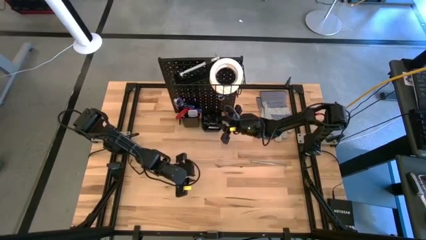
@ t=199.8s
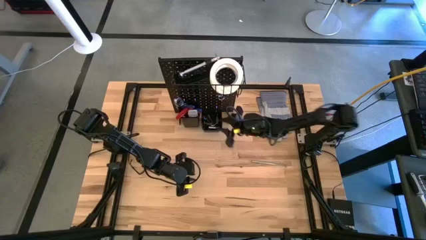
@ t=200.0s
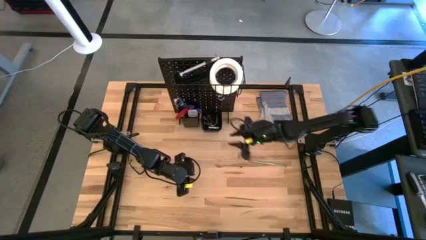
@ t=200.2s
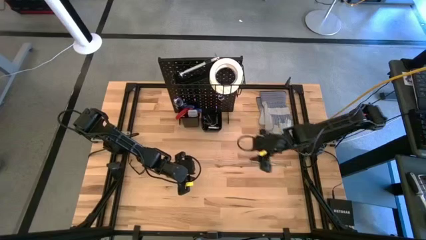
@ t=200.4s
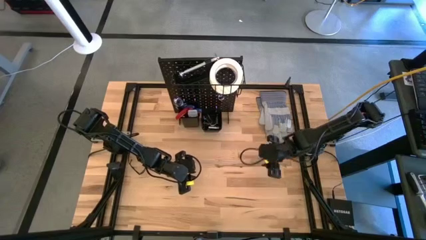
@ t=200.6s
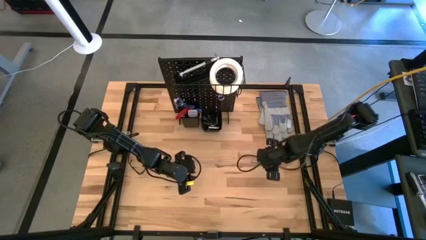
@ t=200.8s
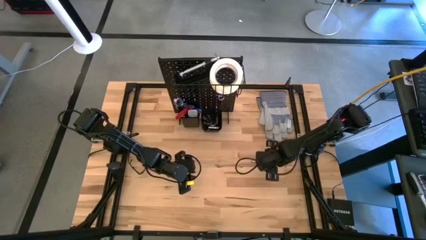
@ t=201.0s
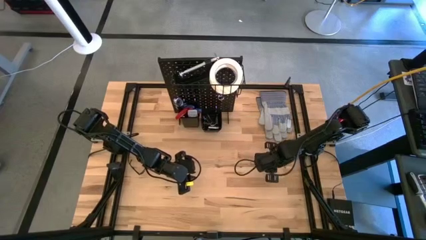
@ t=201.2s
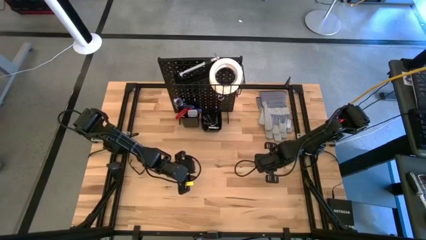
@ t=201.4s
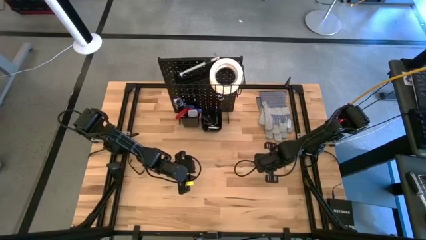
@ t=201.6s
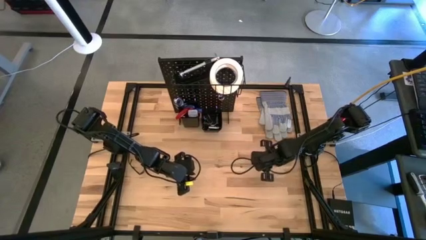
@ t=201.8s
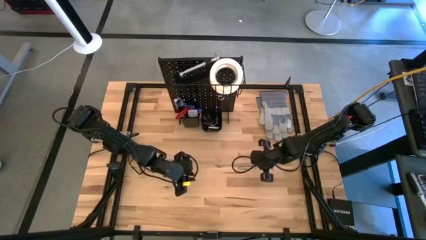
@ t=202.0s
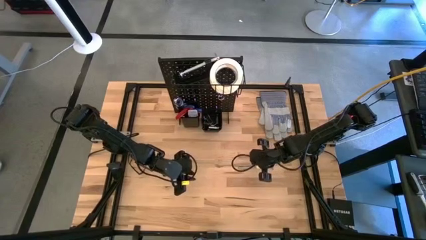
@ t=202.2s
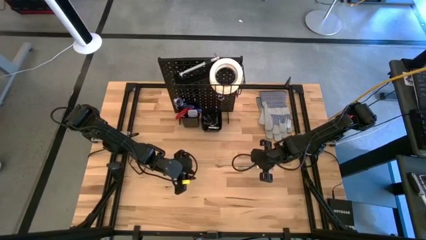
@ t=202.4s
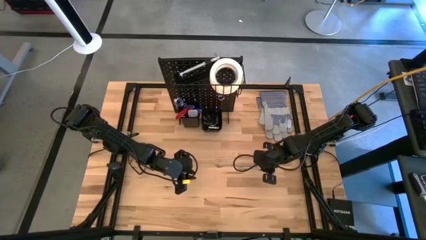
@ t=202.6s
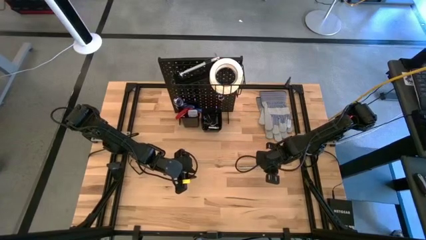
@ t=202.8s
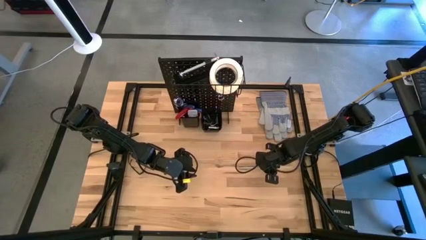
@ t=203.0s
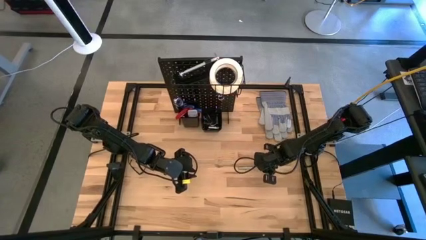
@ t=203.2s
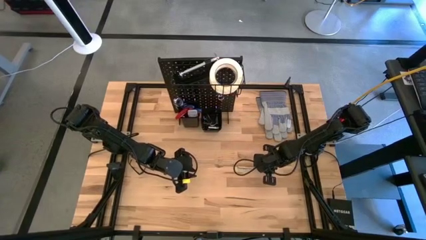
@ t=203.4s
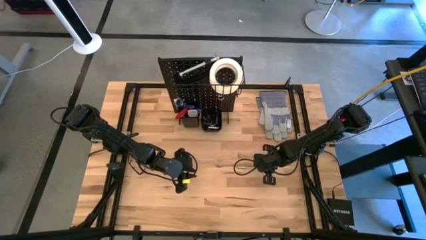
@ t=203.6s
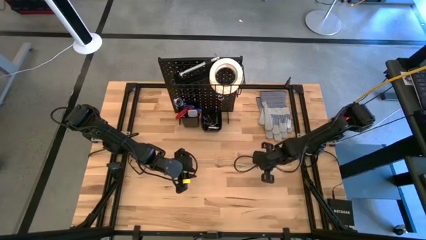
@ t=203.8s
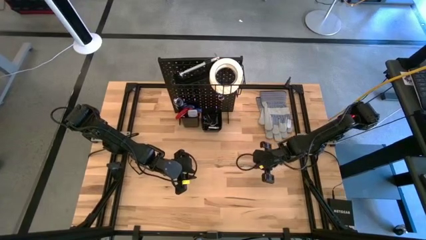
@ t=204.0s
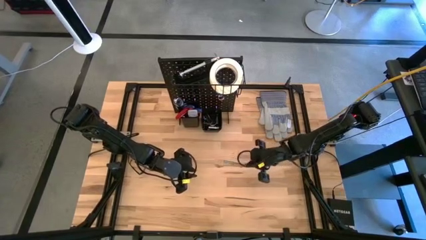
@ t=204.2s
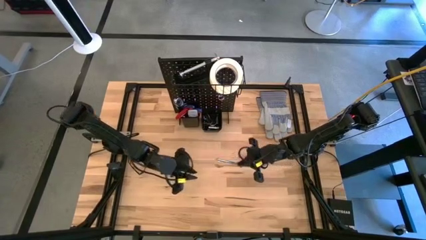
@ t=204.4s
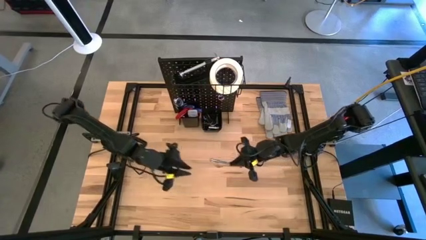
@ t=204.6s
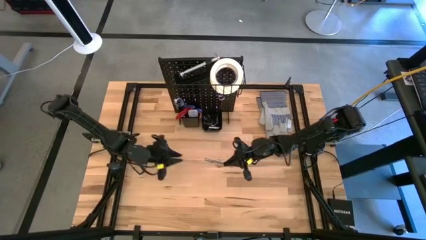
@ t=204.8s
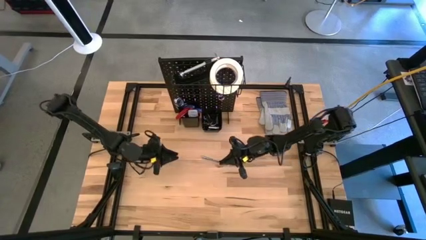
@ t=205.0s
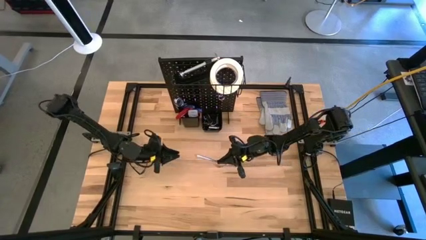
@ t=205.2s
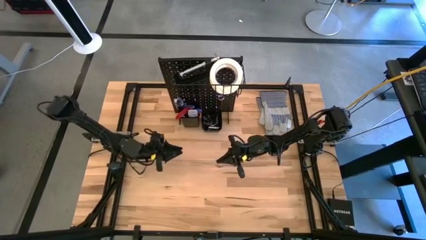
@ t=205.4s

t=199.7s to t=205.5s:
Task: Hang tools onto peg board
Put the stainless antenna into the left bin on the pegboard

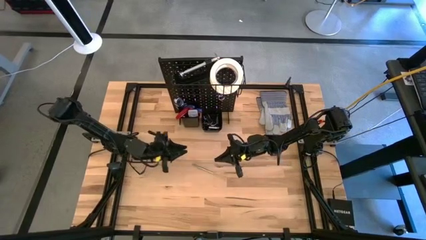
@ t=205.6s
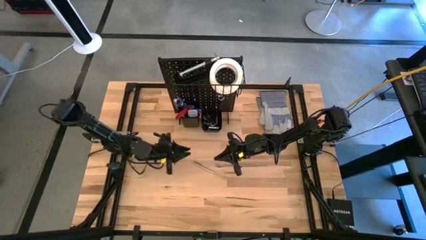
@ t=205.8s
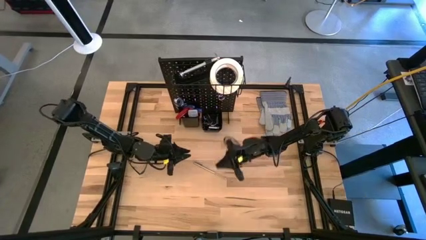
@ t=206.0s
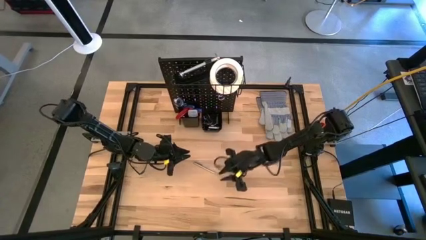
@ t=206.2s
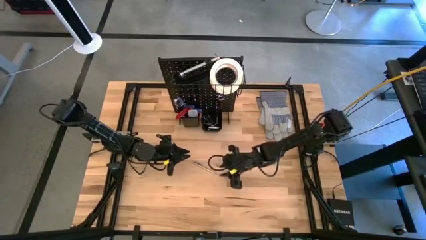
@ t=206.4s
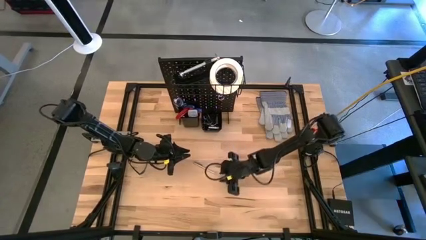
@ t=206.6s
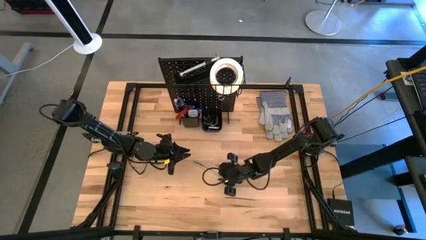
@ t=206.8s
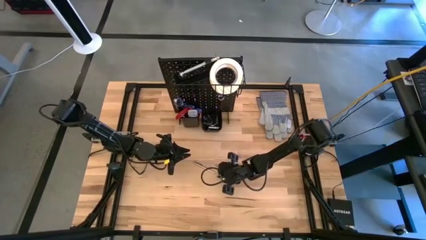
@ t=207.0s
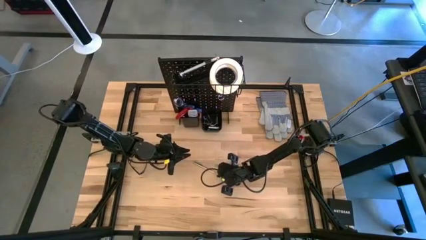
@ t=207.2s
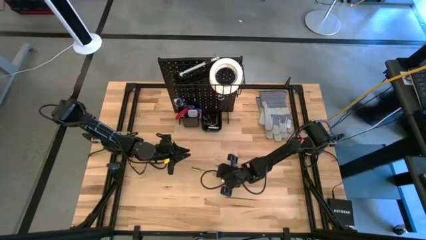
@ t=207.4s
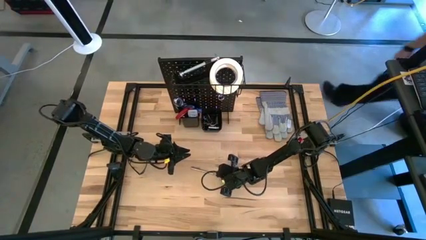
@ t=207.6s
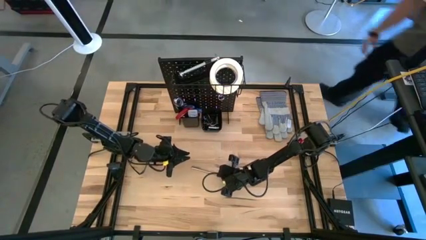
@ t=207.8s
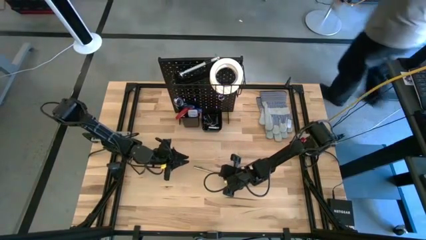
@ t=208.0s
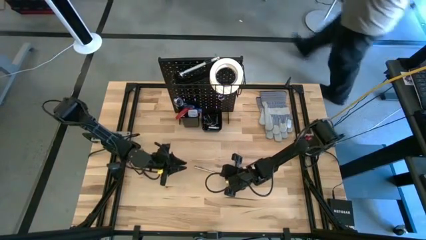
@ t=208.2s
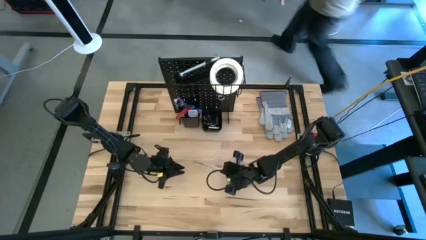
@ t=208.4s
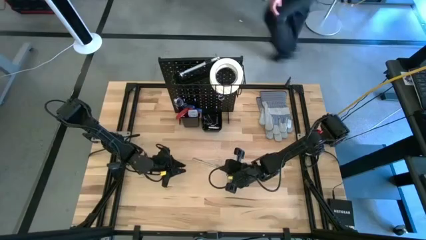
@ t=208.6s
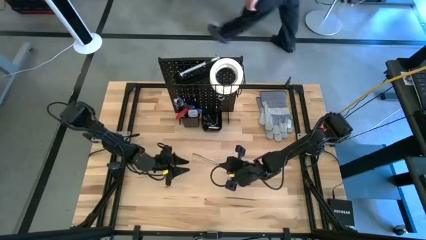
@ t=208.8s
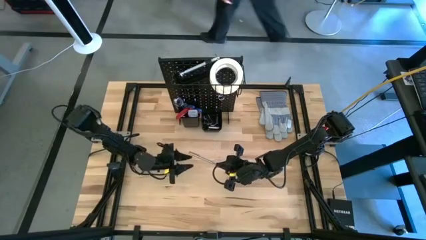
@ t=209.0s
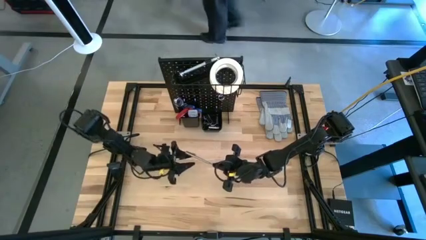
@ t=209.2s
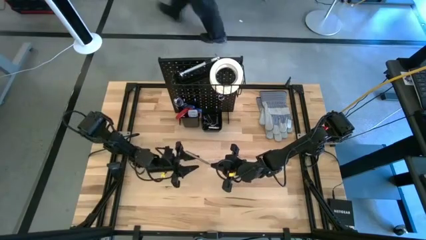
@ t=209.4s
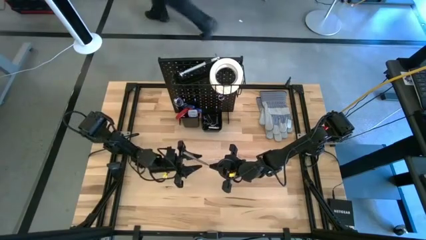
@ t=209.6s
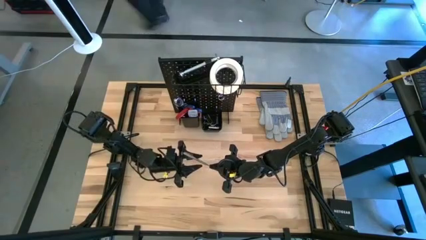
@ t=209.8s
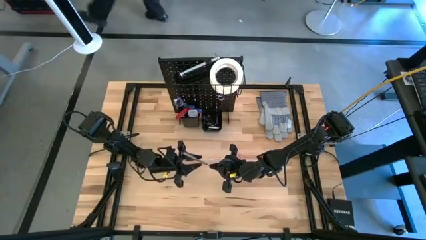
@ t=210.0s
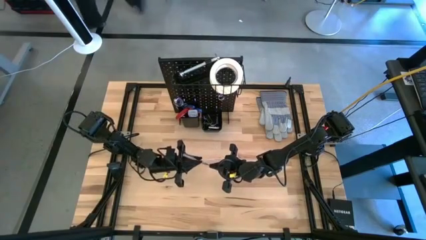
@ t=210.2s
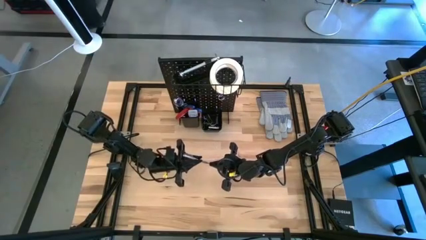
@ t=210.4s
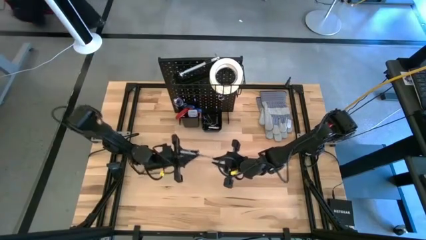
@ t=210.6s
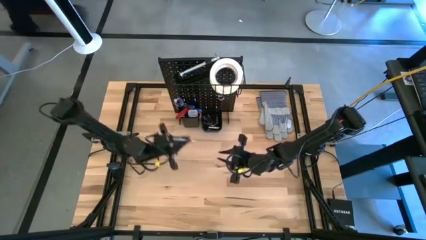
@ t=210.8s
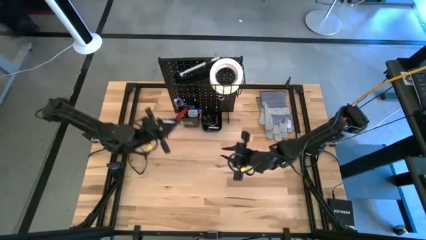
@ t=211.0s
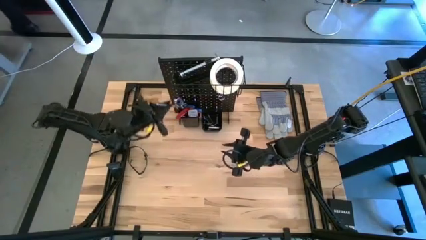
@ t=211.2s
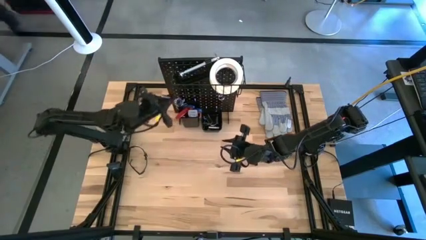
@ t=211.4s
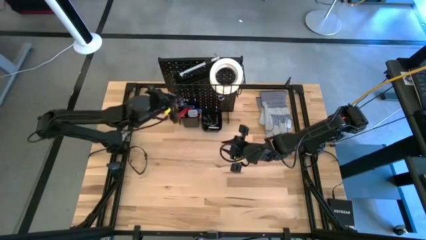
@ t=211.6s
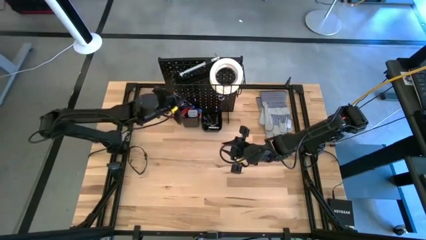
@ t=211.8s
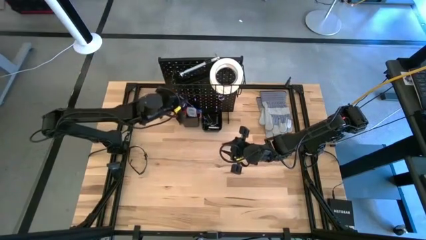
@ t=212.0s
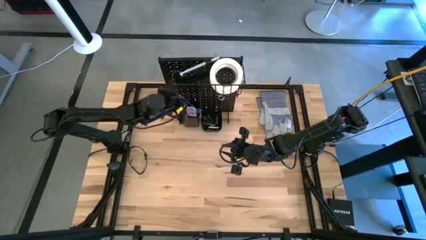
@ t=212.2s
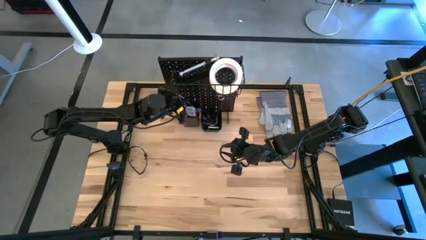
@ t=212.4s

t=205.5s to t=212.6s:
Put the stainless antenna into the left bin on the pegboard
